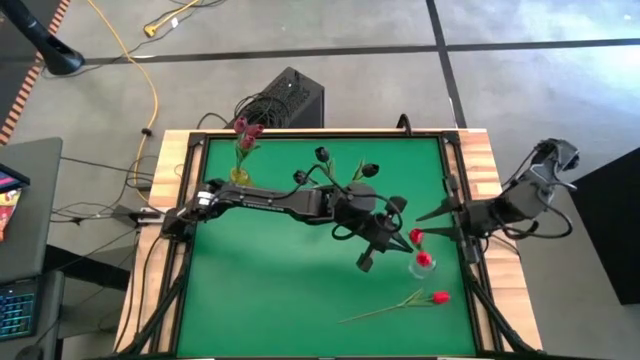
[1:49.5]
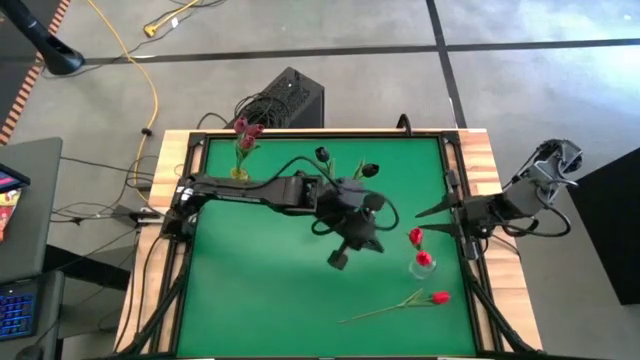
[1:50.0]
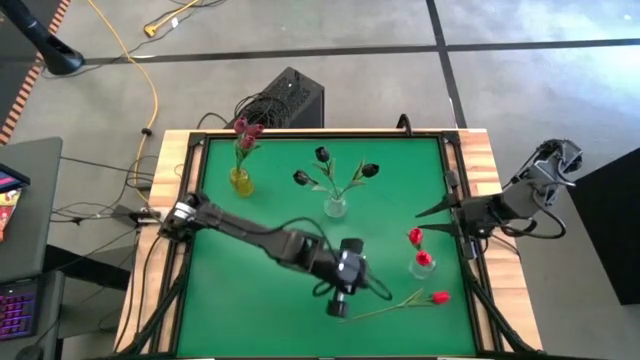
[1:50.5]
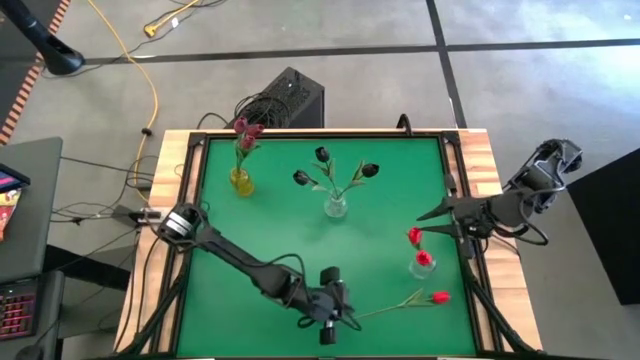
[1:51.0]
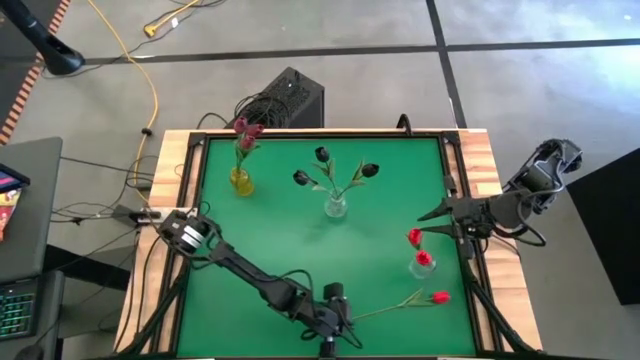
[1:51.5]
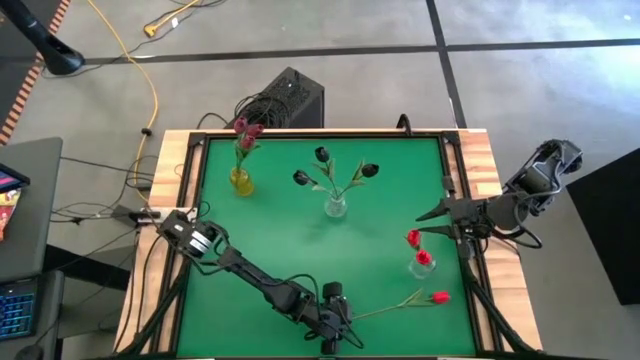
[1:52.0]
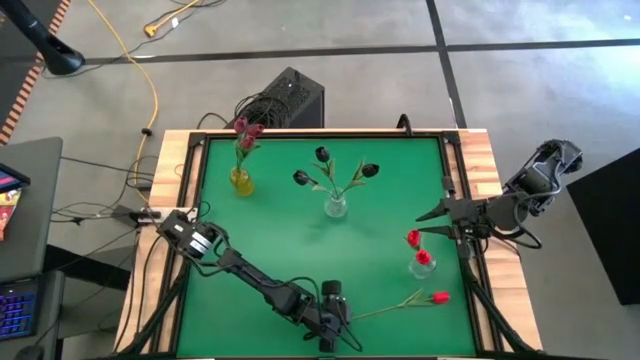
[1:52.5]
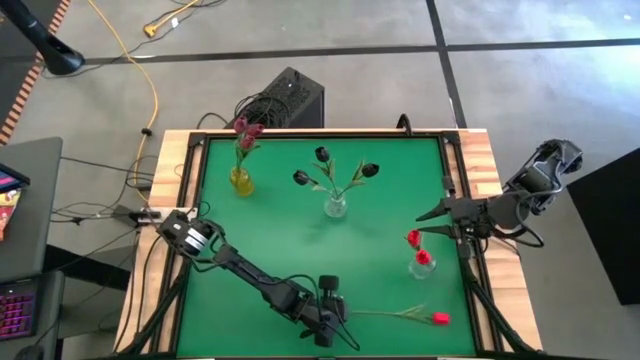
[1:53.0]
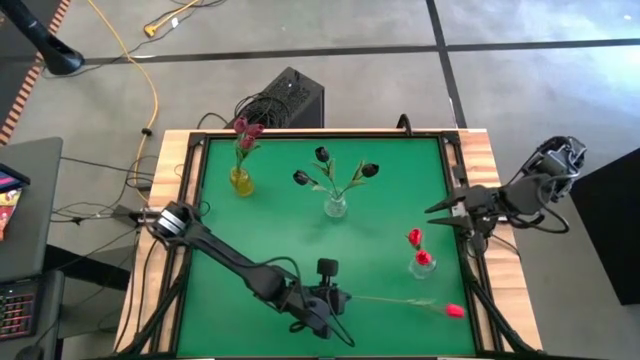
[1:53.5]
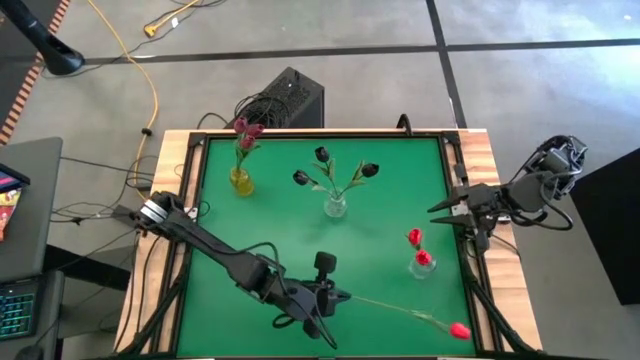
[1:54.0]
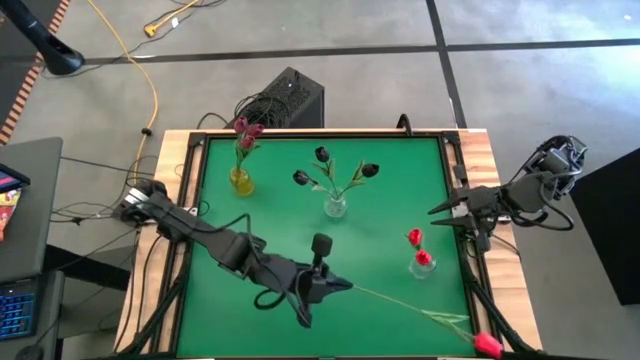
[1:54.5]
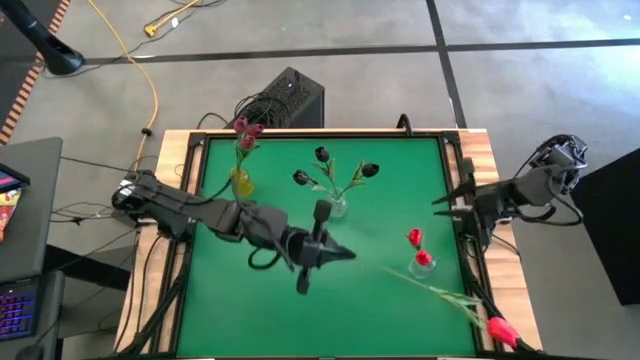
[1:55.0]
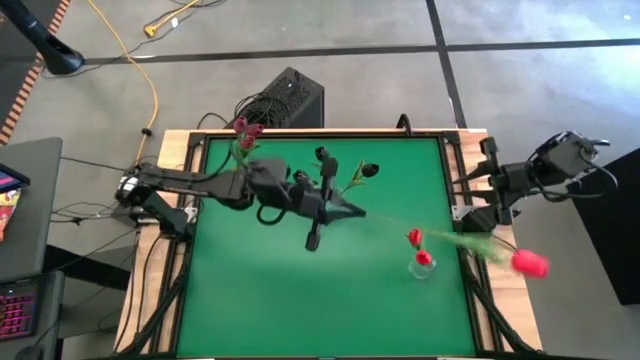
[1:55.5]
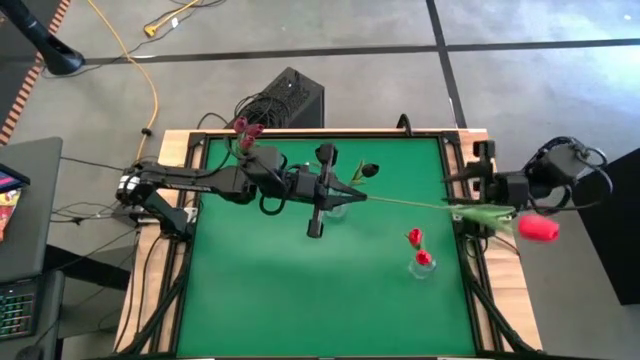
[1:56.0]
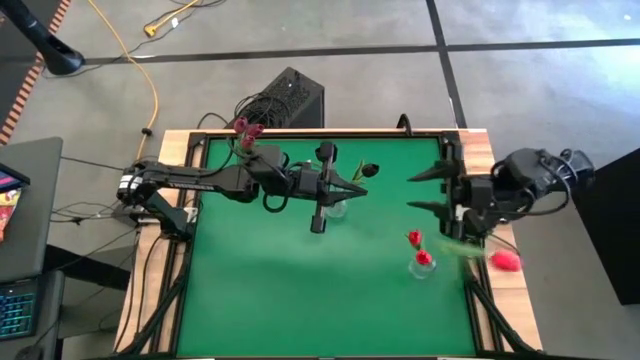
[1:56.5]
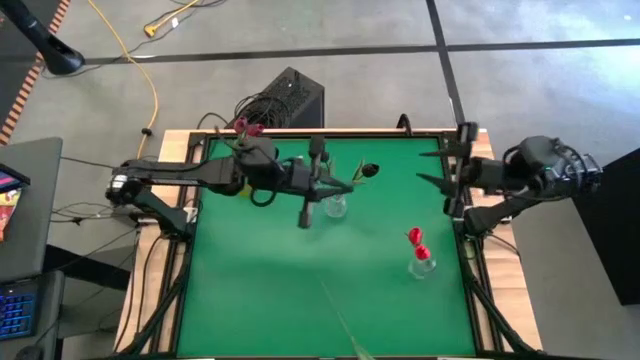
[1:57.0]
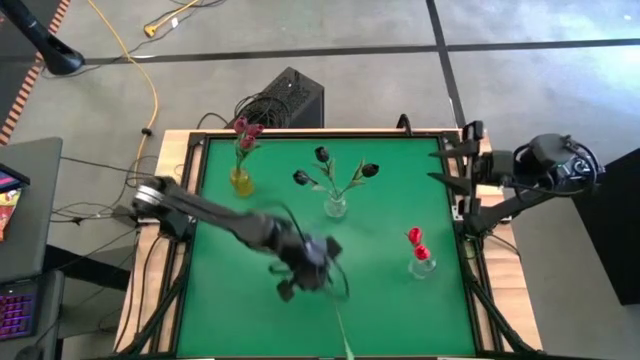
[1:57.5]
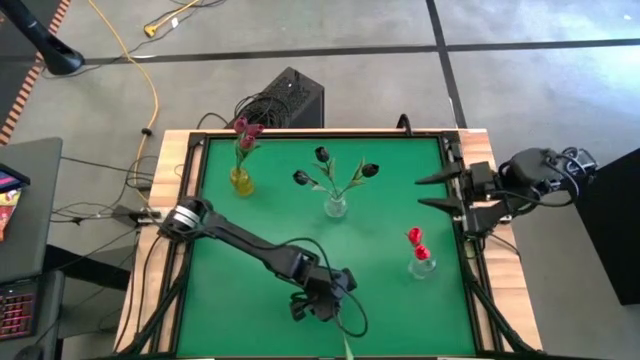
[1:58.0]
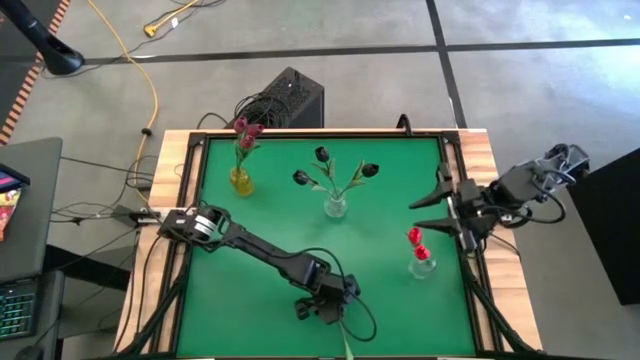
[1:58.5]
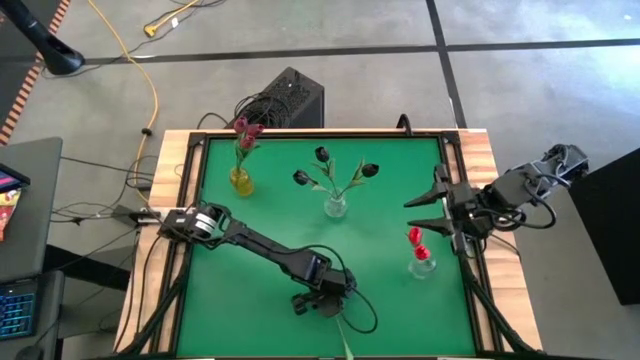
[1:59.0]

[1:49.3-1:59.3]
Task: Sort flowers into vase by color
Put the red flower into the red transparent vase

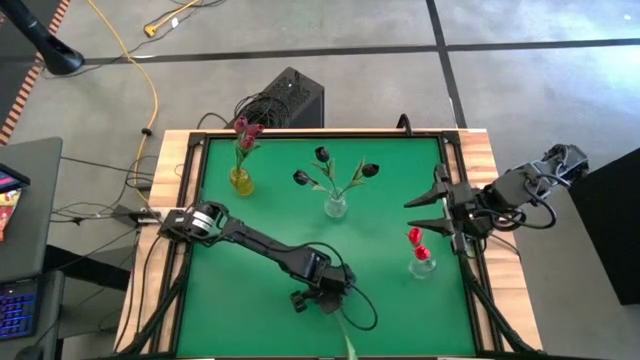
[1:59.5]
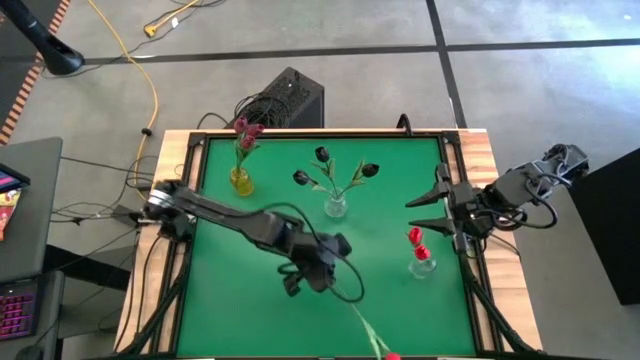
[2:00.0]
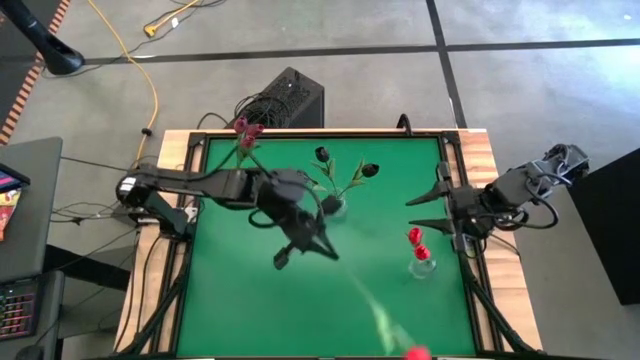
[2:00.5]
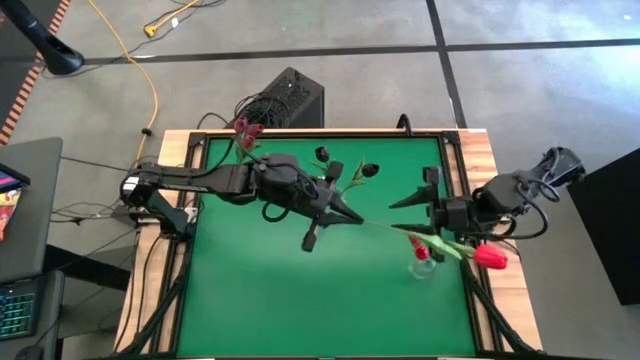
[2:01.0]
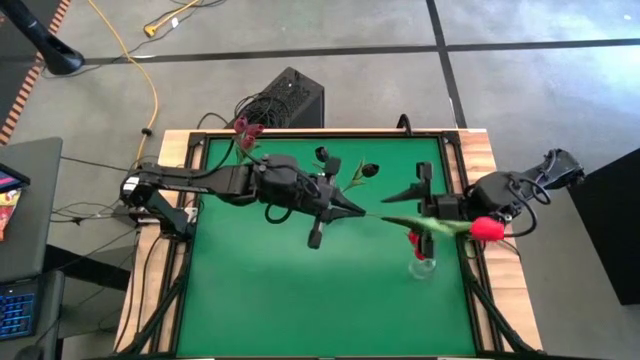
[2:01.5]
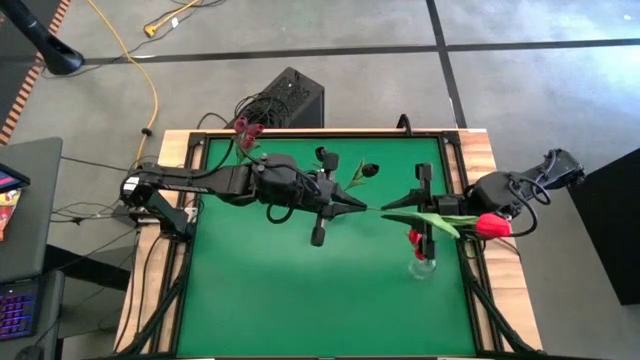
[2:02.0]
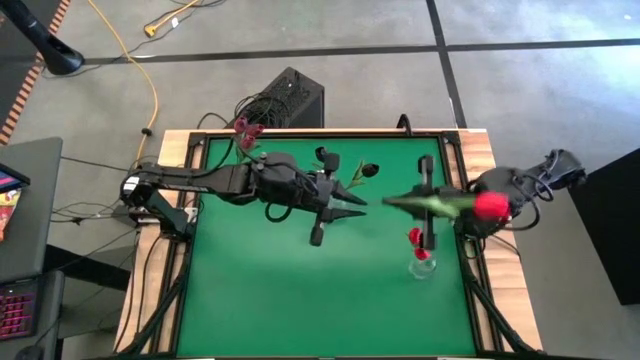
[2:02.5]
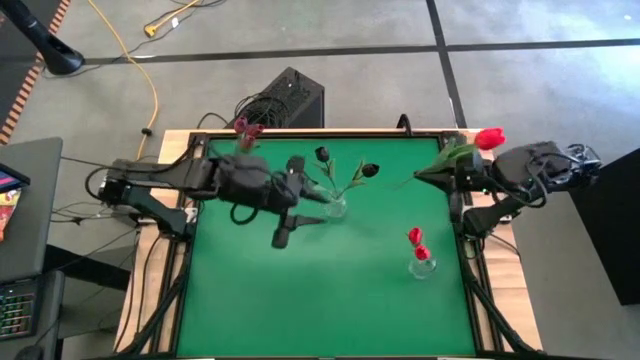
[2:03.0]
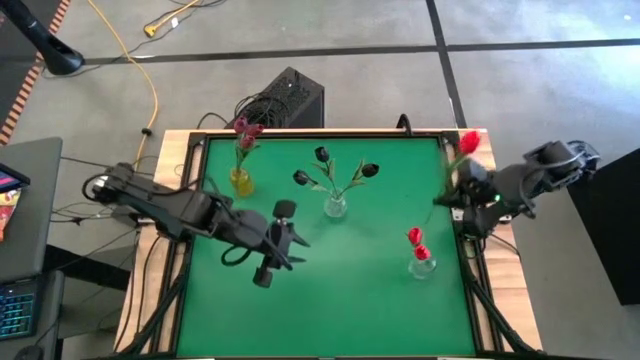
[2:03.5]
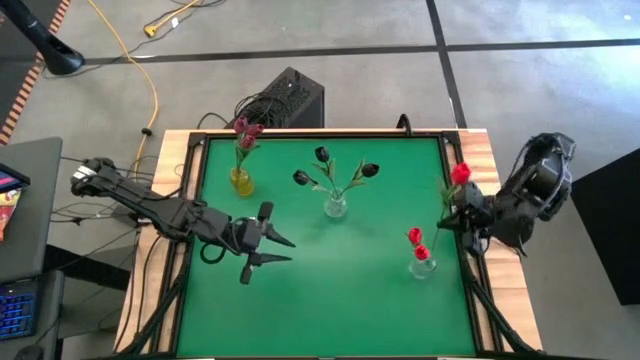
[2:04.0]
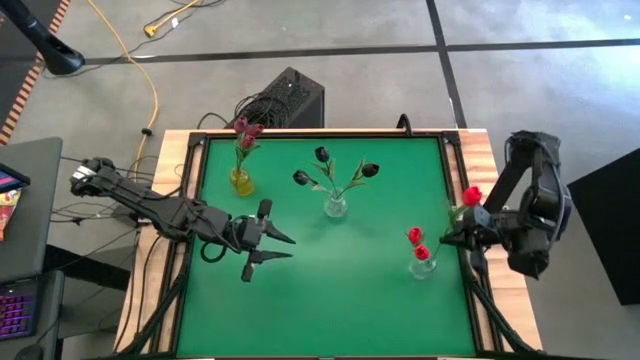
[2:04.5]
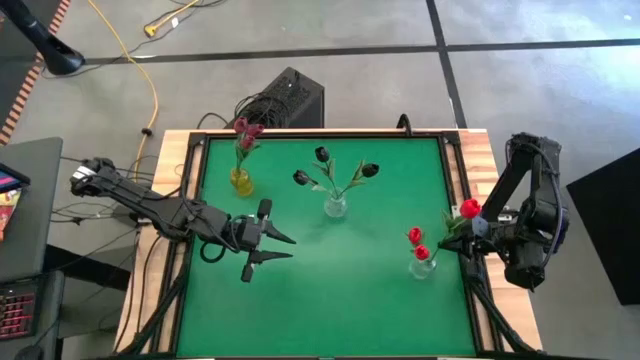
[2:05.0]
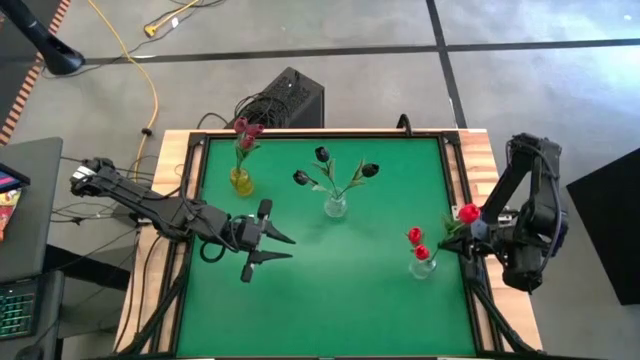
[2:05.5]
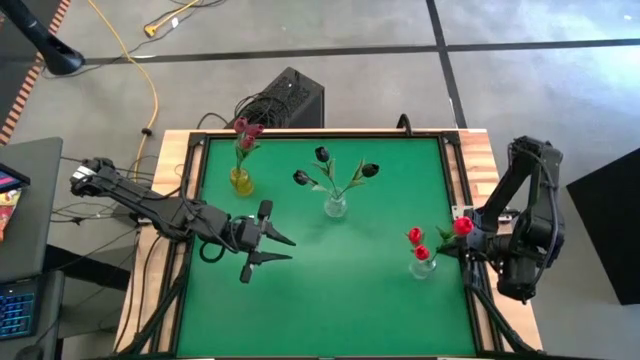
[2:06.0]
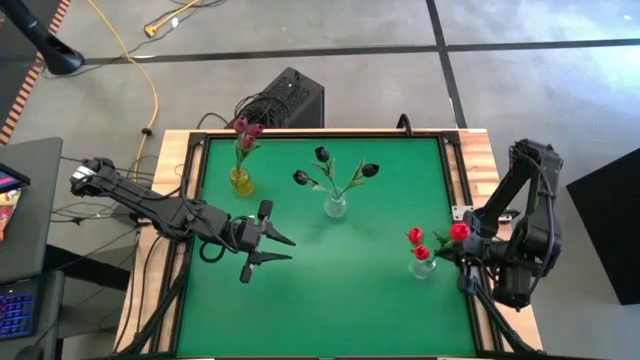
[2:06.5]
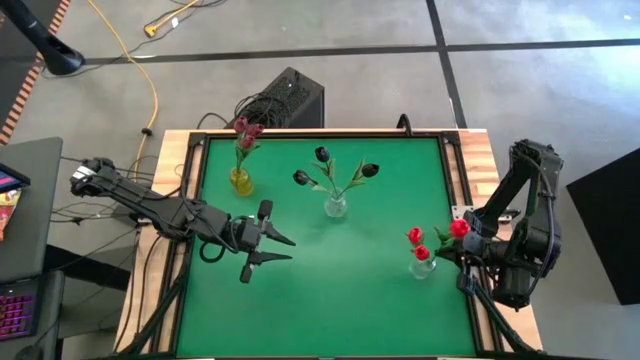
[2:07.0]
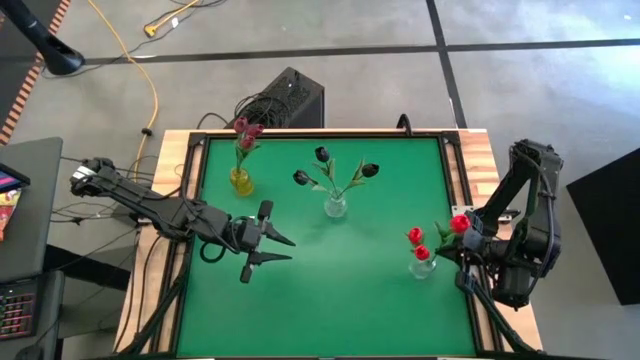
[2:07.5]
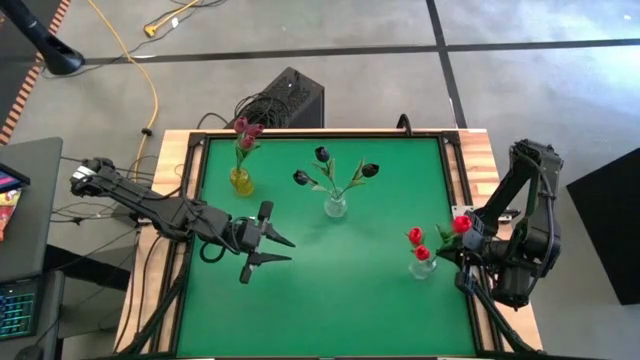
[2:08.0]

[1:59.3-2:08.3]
Put the red flower into the red transparent vase

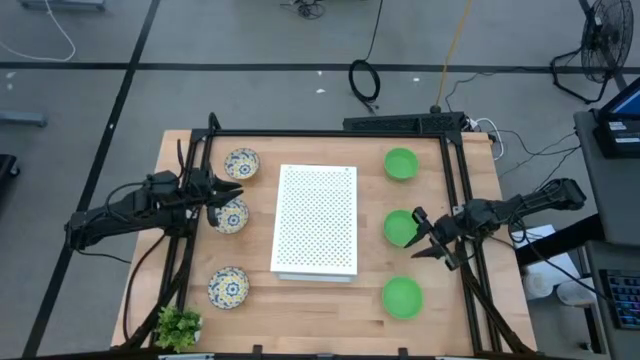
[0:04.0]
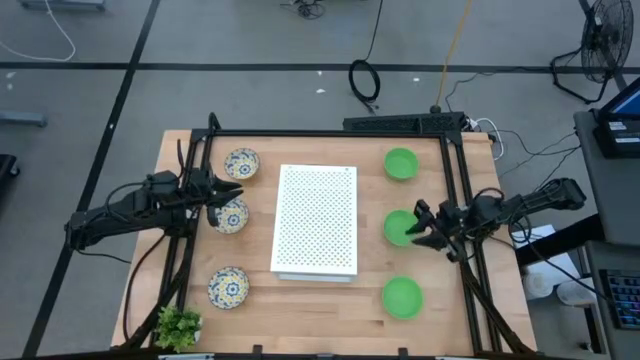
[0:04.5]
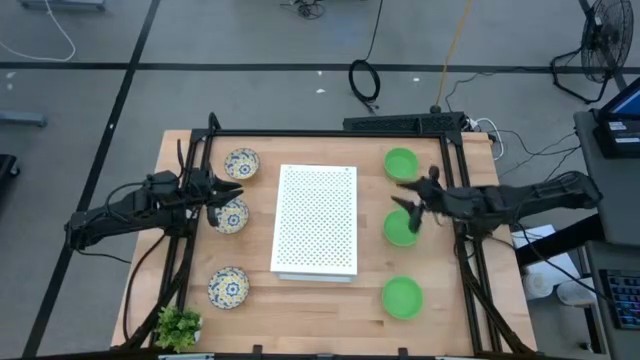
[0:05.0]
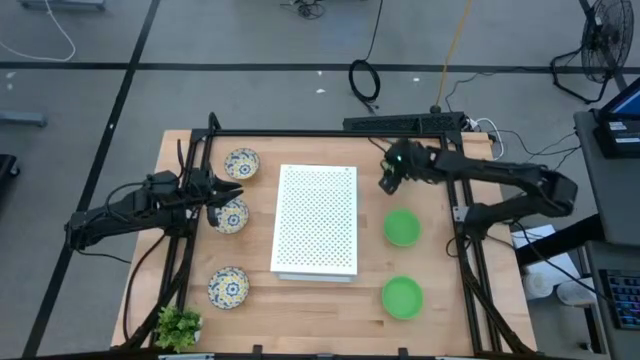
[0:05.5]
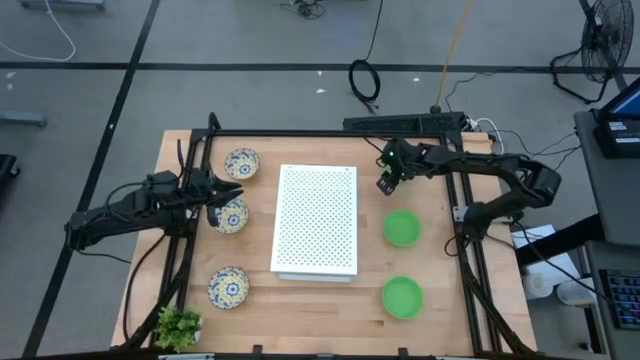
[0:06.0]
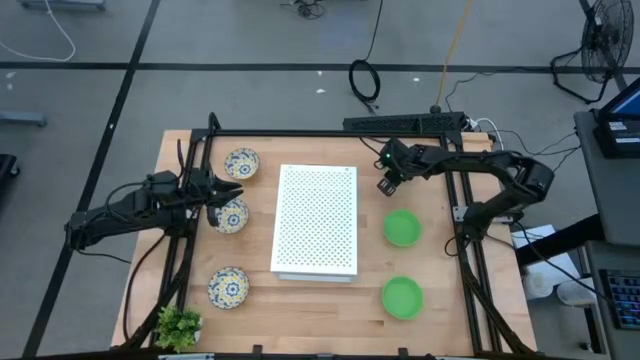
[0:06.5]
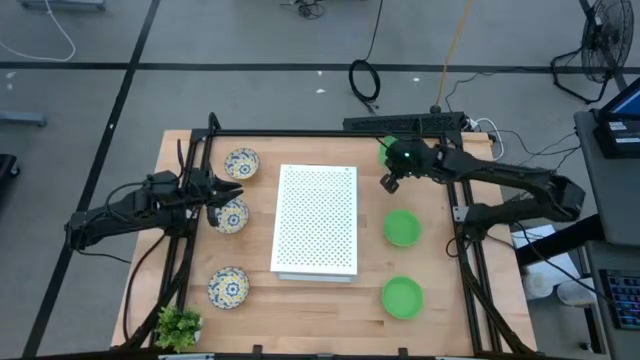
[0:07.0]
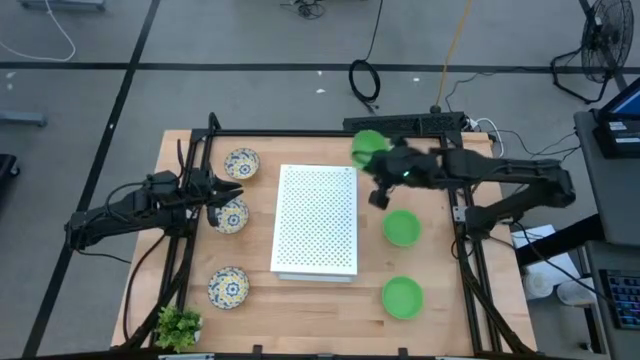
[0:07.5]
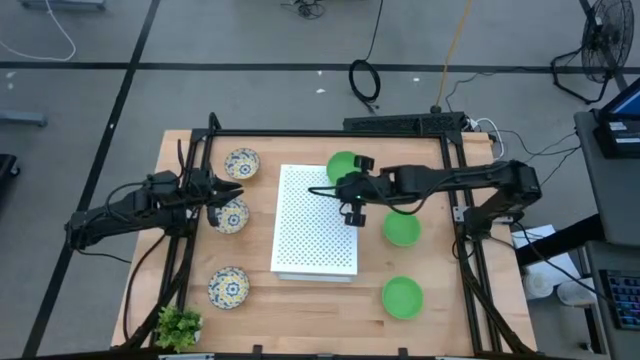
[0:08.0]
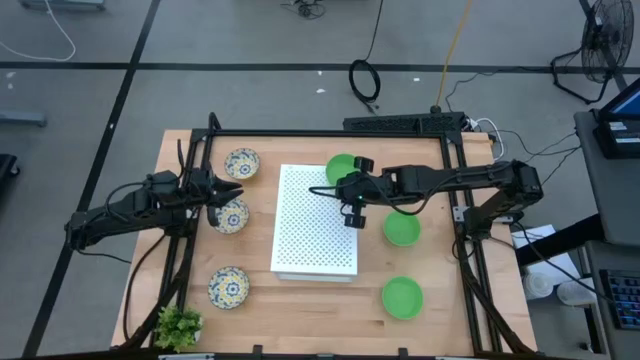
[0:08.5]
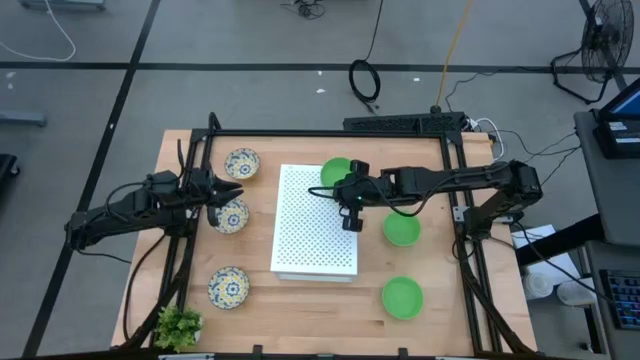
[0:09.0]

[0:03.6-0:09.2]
Task: Pick & Place Mini bowls
Put the top green bowl on the shelf
